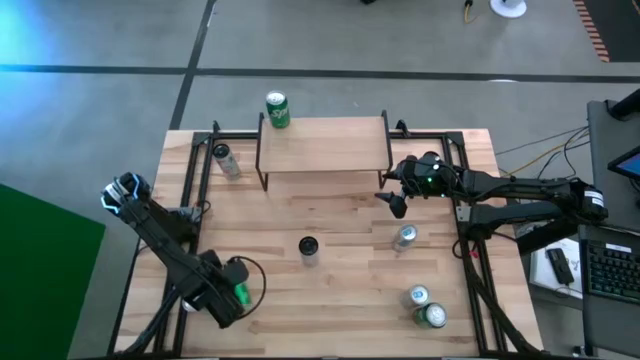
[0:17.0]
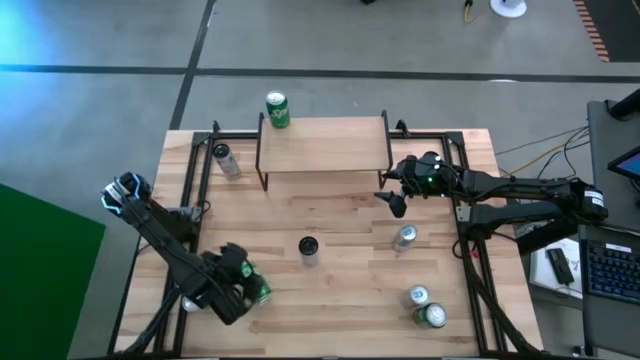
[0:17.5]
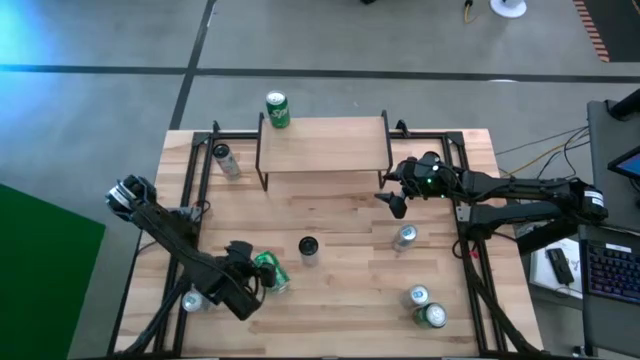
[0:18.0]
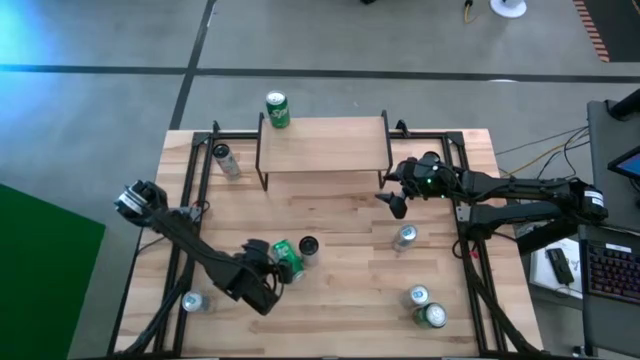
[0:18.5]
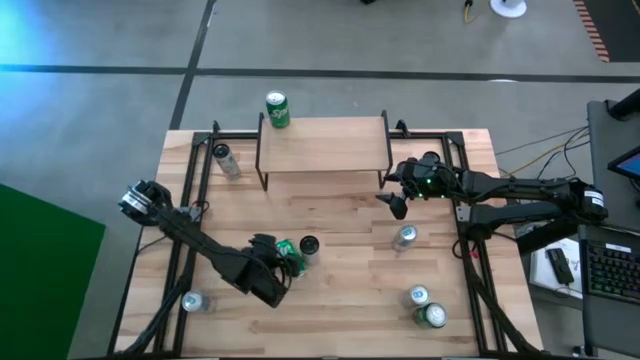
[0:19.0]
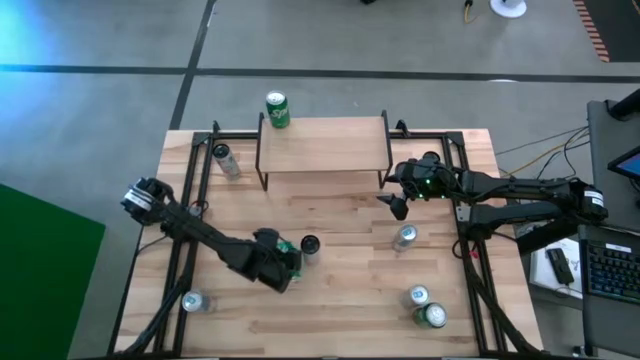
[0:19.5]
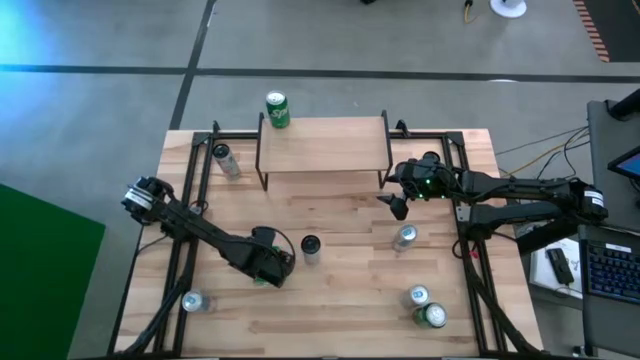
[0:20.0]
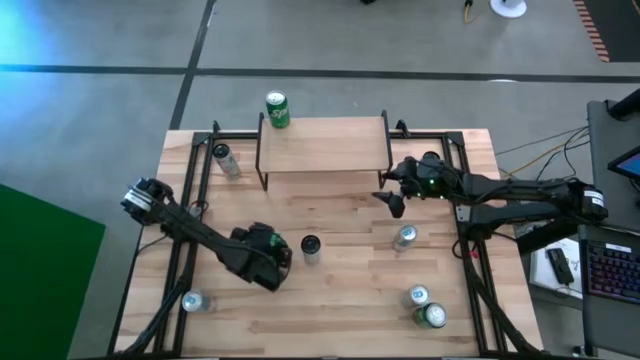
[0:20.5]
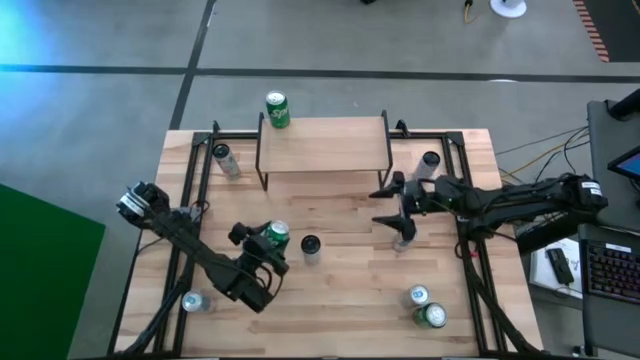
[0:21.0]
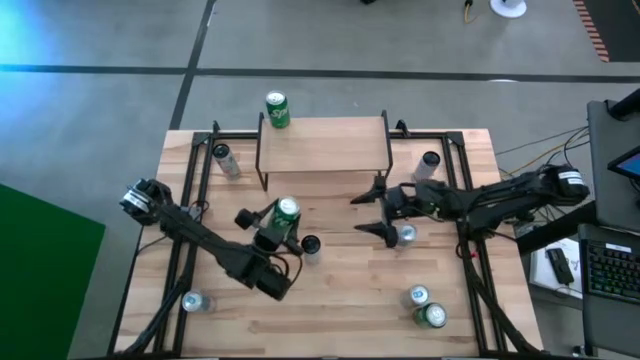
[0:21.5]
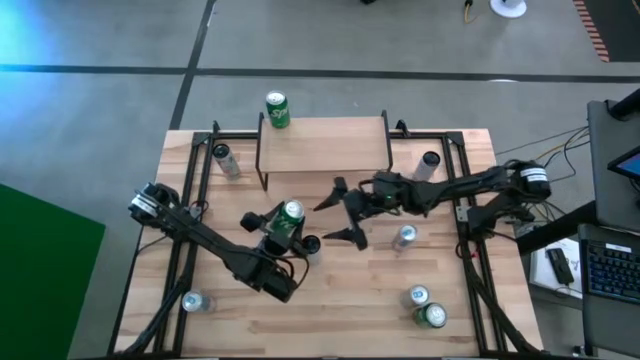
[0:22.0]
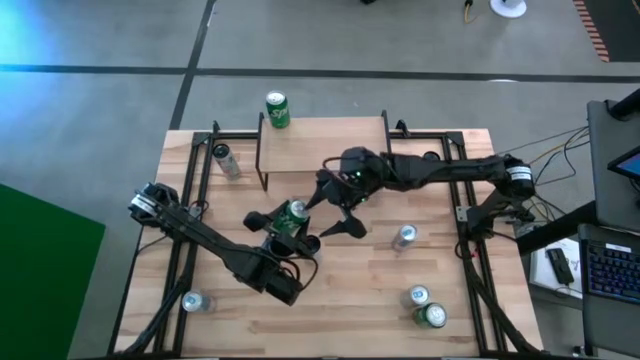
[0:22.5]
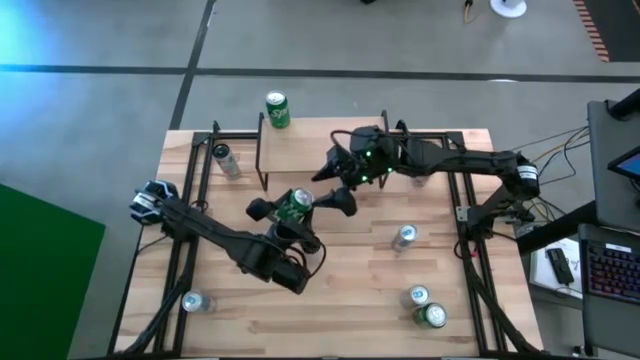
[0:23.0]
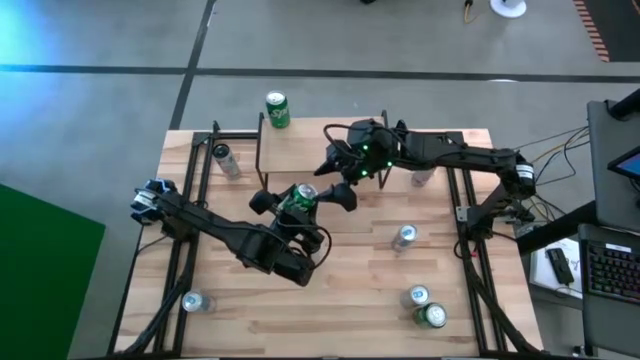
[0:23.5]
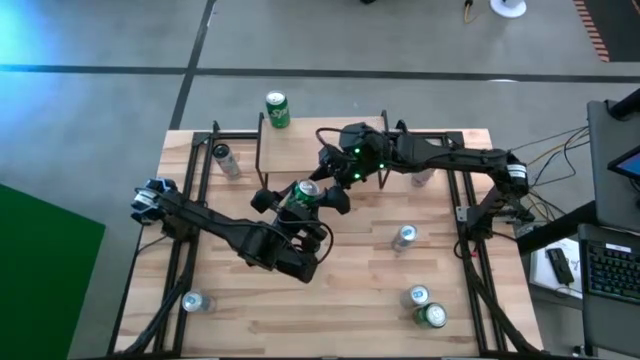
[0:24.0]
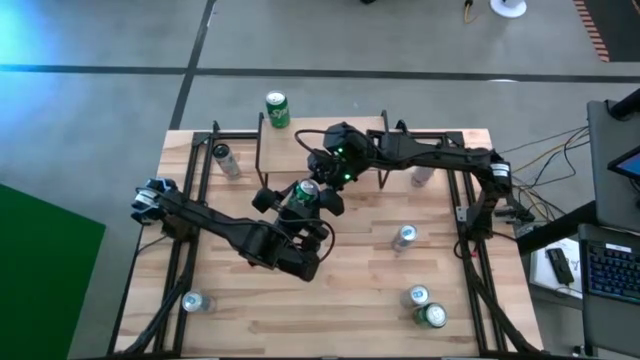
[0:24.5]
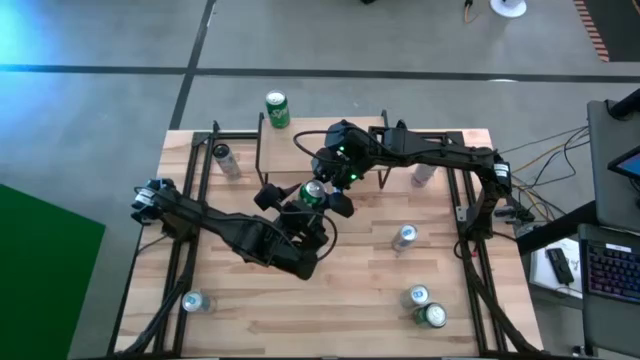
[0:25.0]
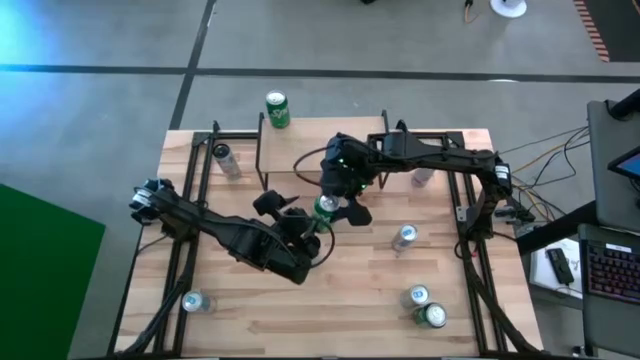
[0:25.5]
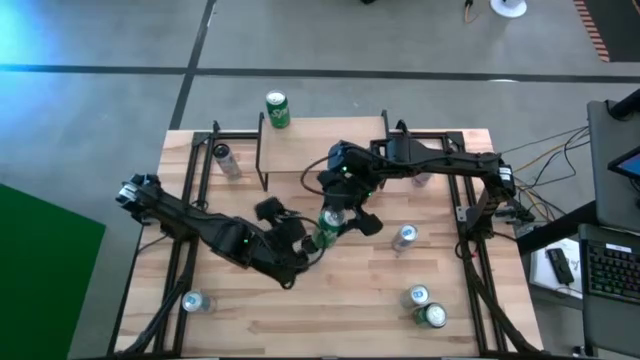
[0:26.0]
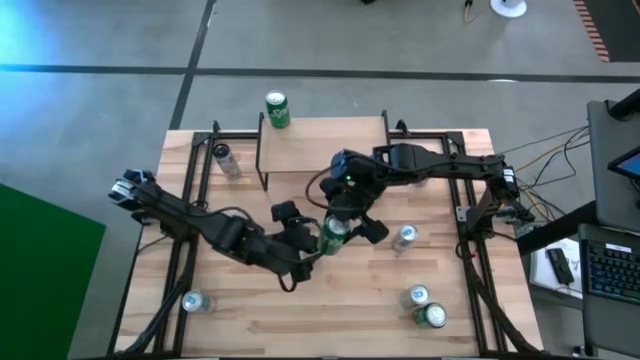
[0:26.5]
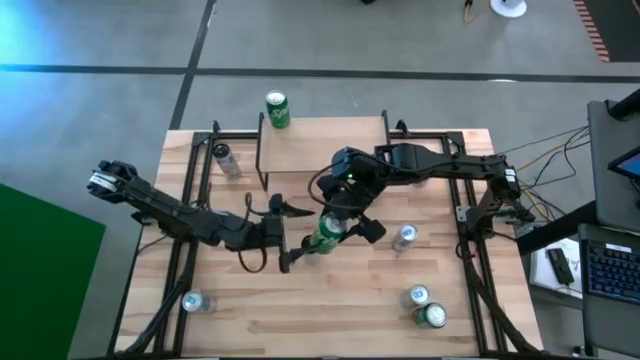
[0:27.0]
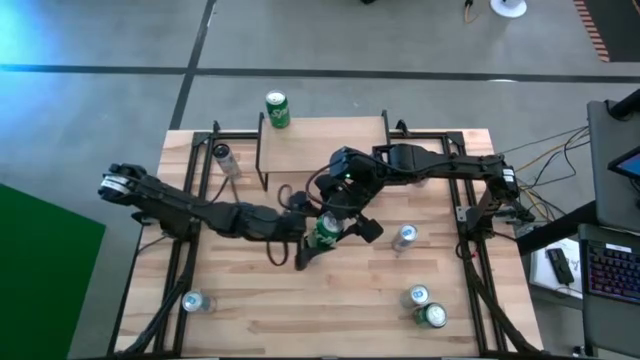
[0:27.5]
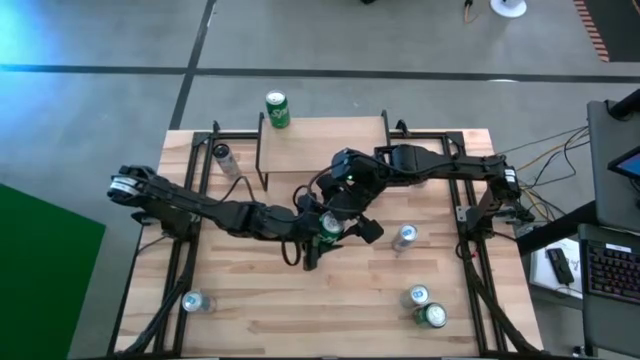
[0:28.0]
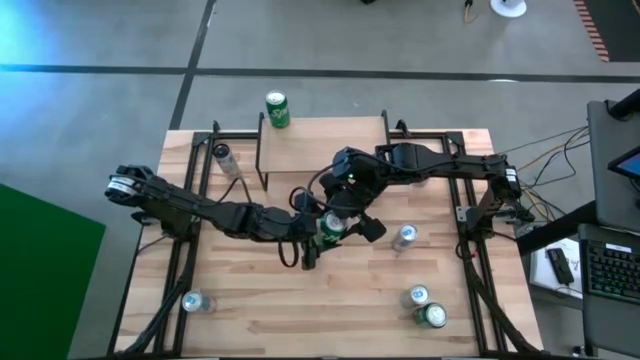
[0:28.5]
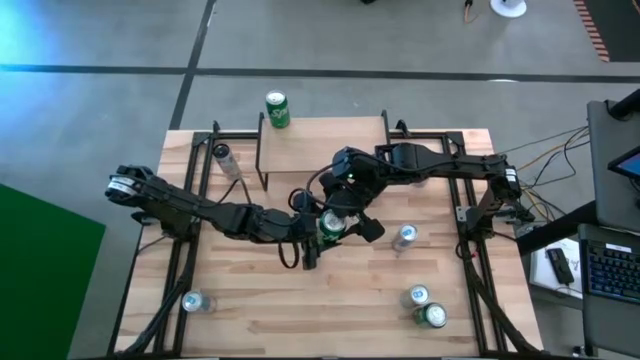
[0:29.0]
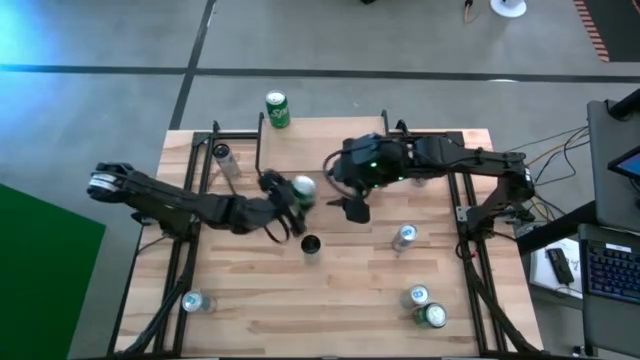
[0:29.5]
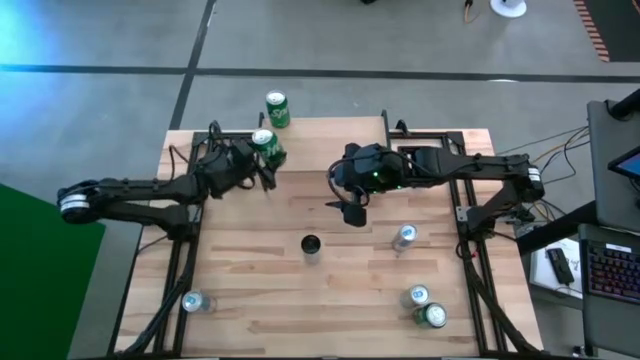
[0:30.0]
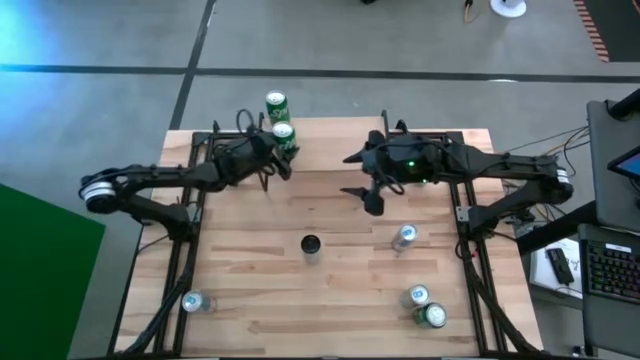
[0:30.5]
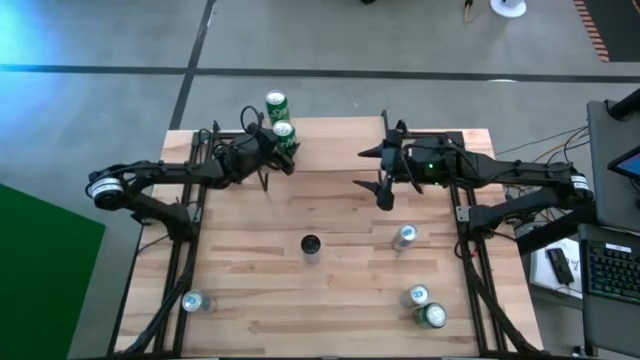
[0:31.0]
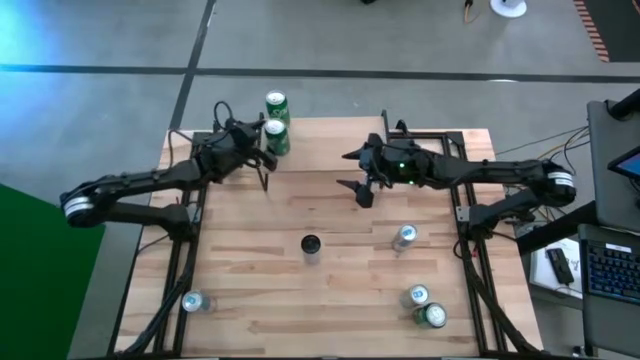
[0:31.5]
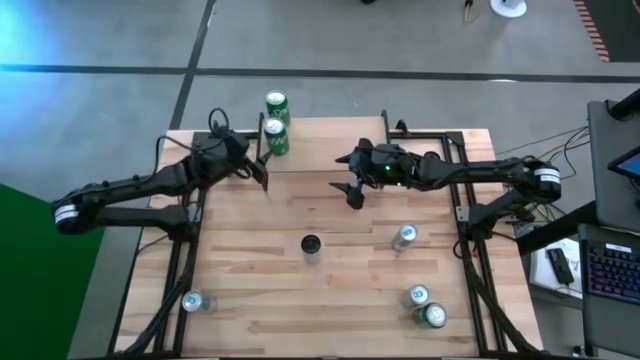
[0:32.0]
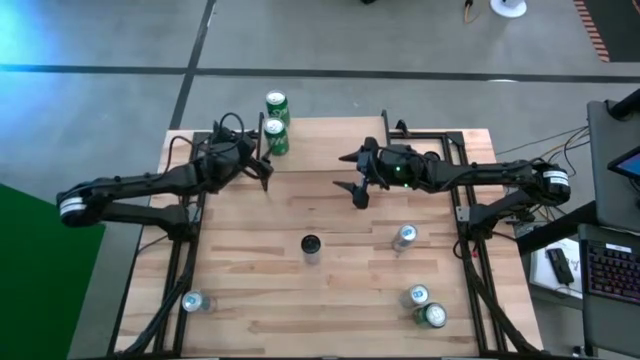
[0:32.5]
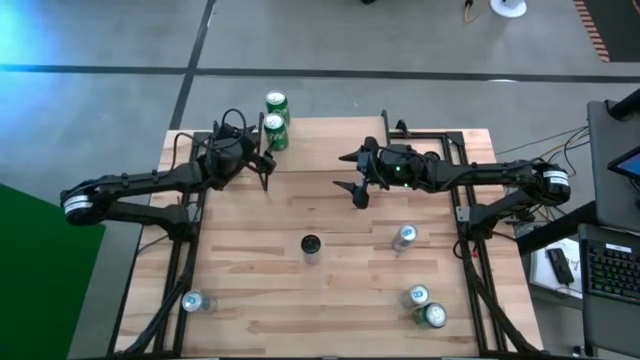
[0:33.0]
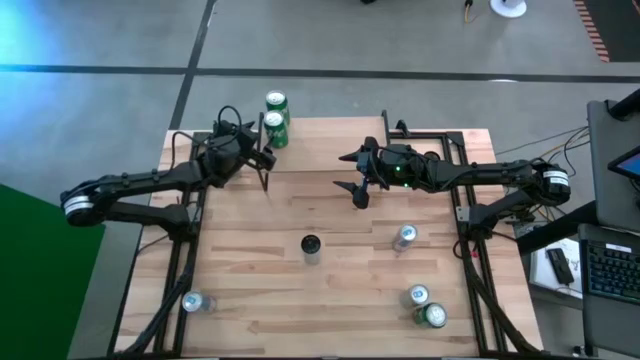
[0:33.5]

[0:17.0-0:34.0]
Task: Place canned beverage on shelf
Put the left green soda can on the shelf aligned with other green soda cans

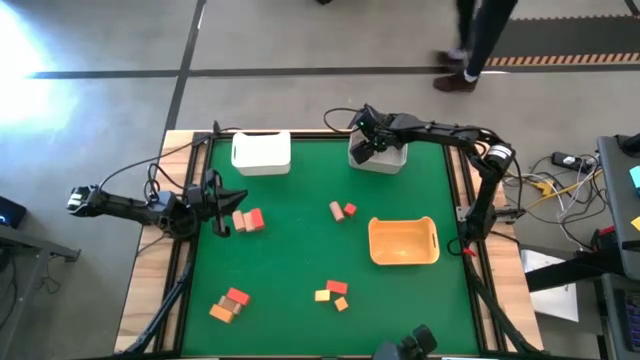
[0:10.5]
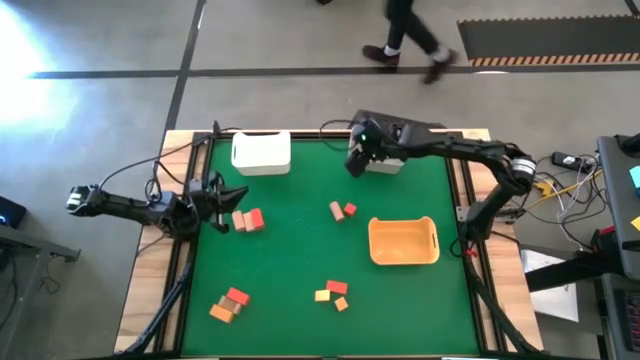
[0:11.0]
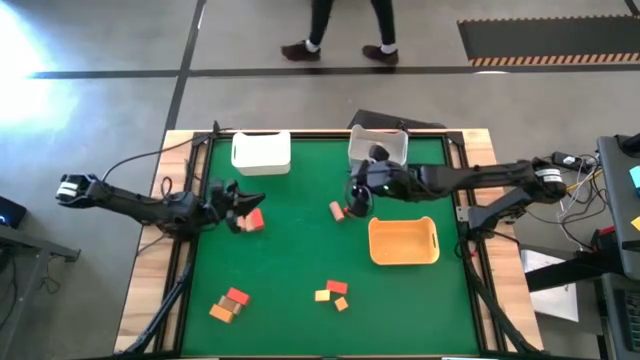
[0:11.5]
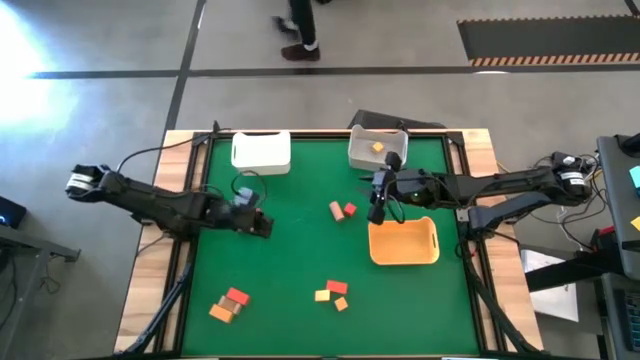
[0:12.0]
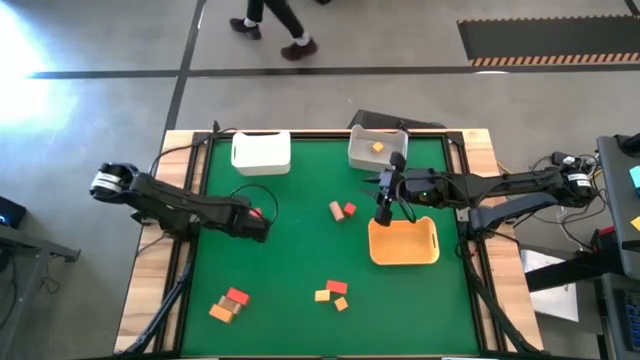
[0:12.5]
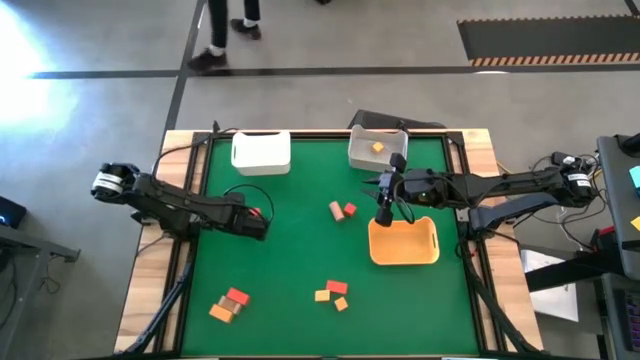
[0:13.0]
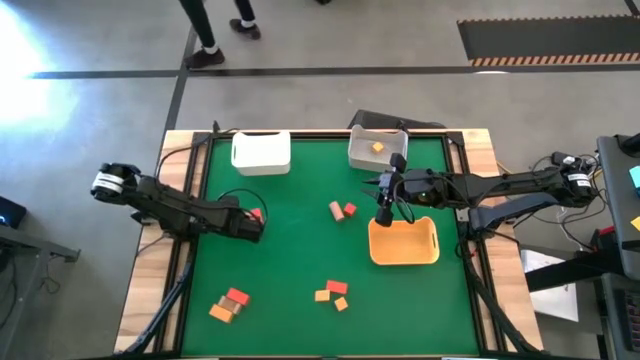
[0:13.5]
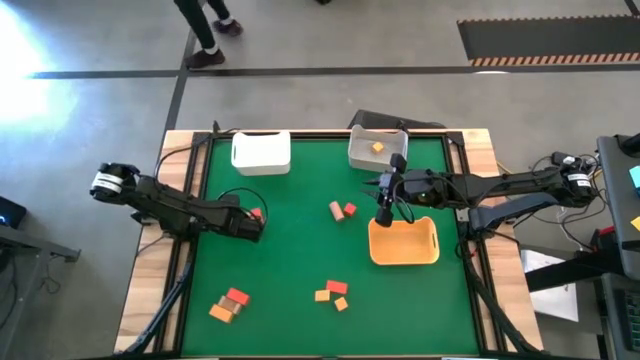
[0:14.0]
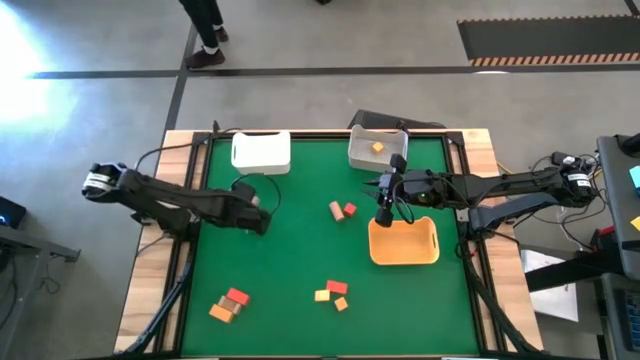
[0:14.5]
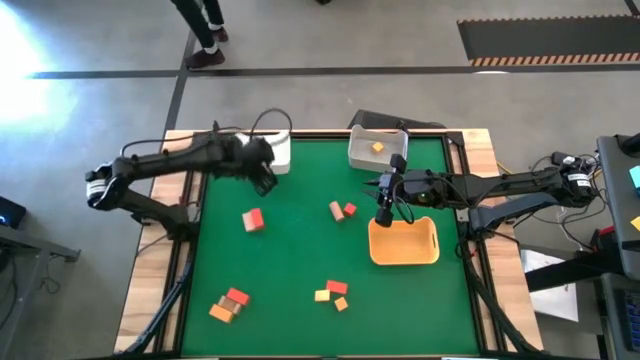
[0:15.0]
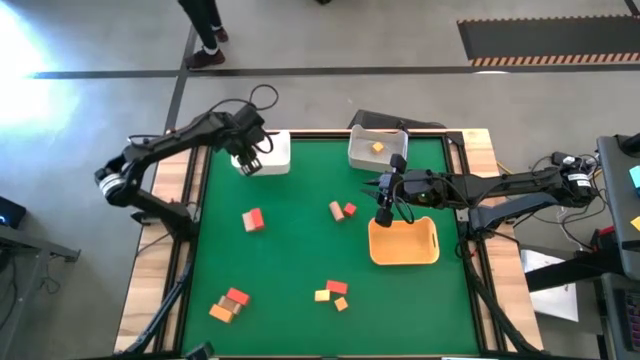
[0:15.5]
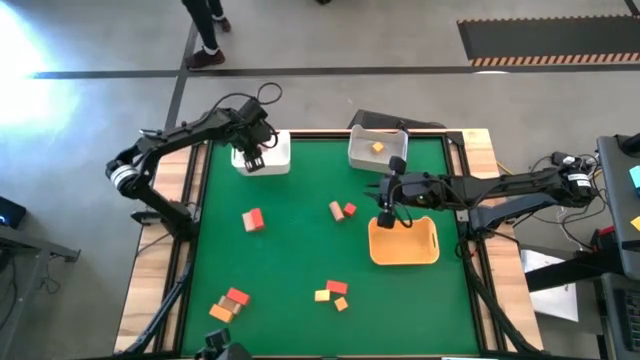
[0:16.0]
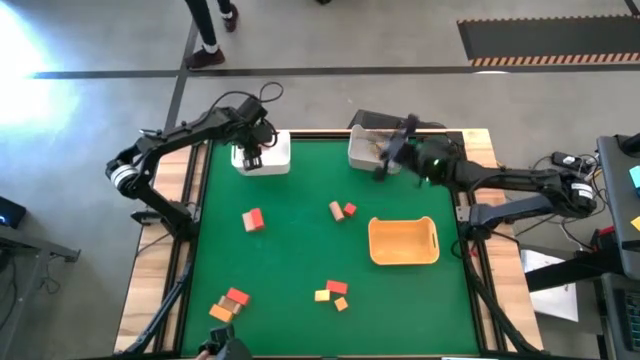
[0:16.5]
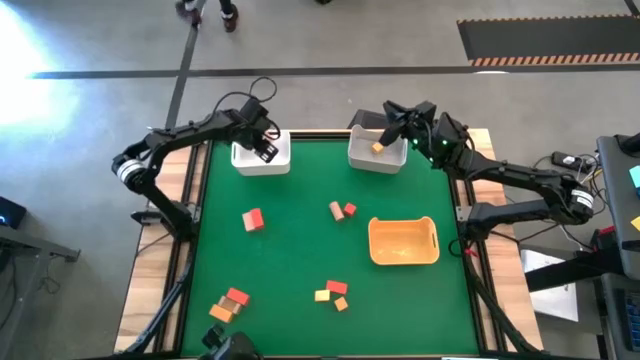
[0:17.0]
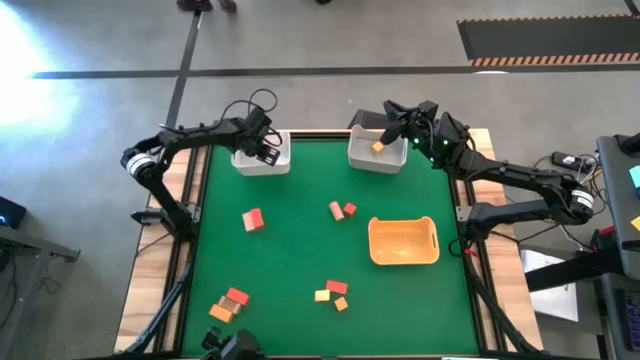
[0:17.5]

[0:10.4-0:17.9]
Task: Sort & place blocks by color
Put the brown block into the white bin
